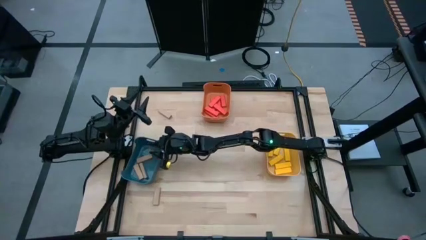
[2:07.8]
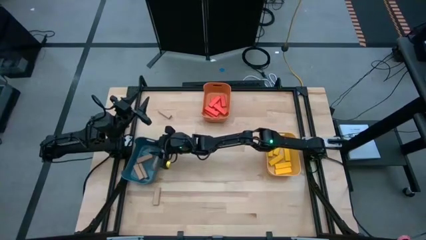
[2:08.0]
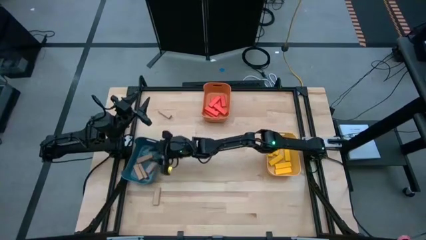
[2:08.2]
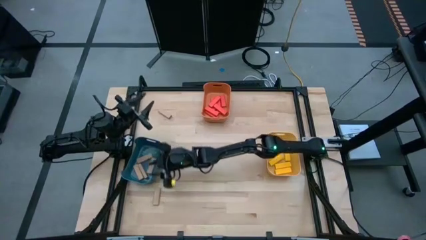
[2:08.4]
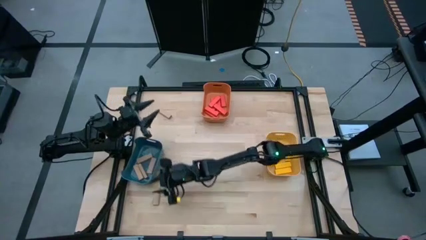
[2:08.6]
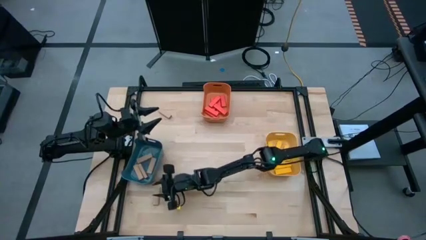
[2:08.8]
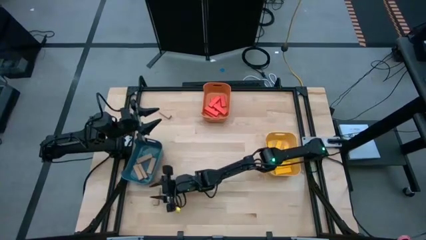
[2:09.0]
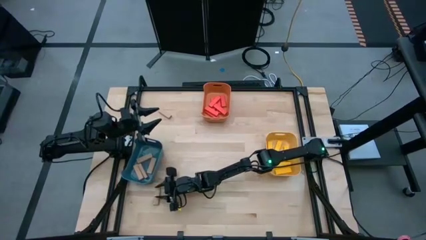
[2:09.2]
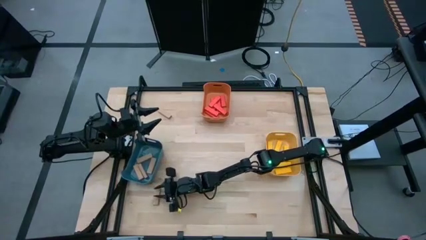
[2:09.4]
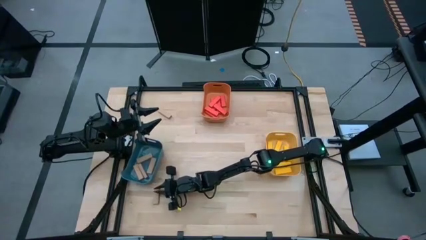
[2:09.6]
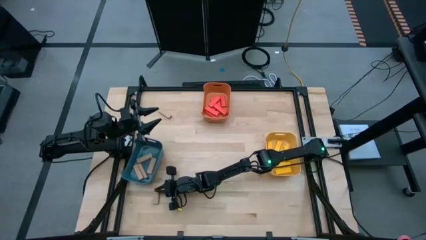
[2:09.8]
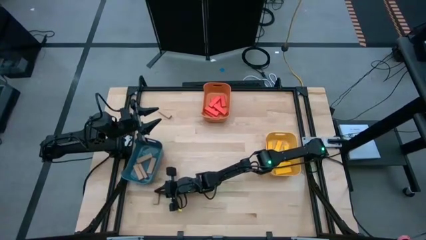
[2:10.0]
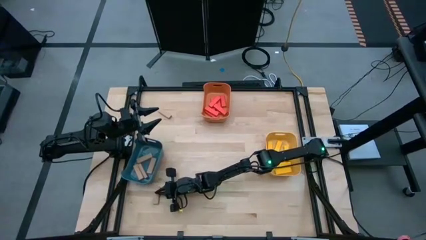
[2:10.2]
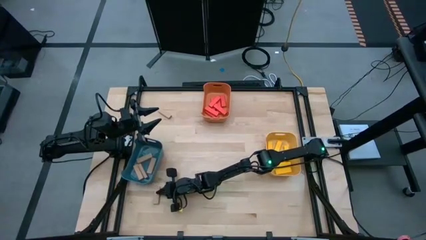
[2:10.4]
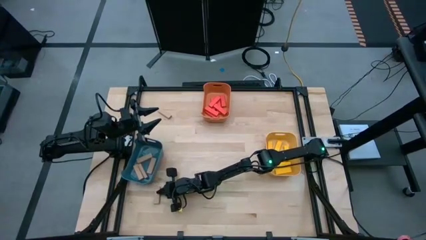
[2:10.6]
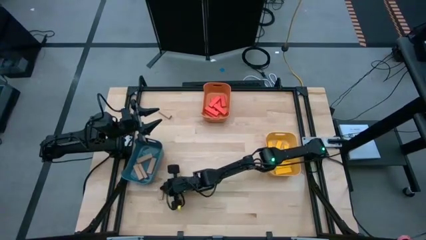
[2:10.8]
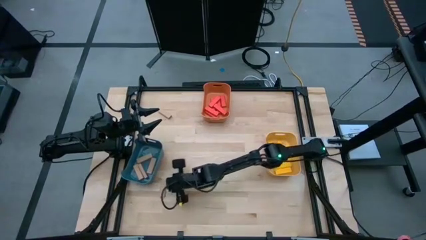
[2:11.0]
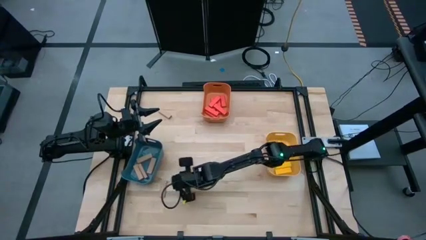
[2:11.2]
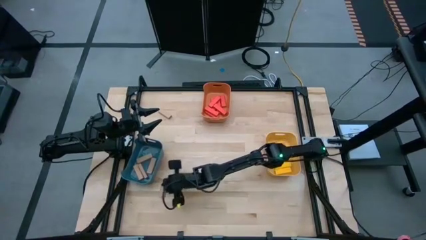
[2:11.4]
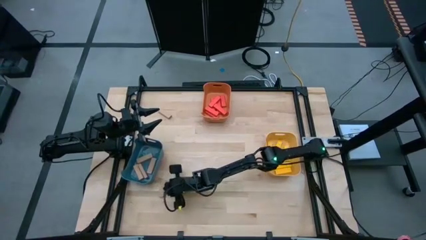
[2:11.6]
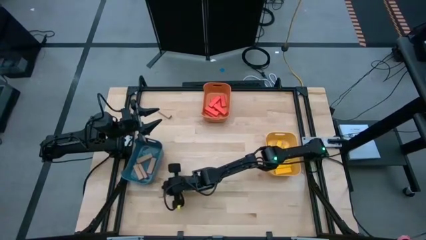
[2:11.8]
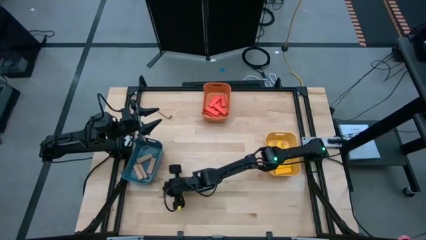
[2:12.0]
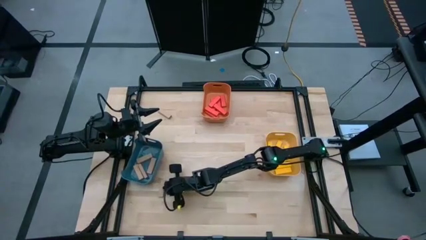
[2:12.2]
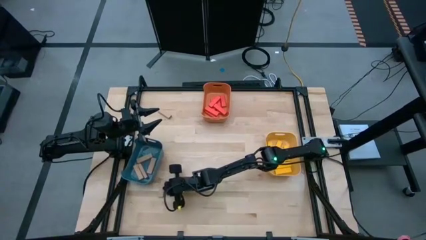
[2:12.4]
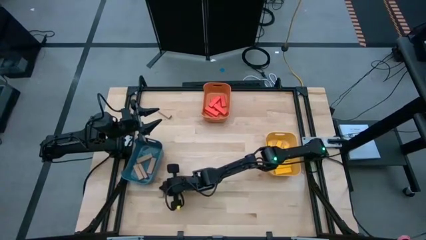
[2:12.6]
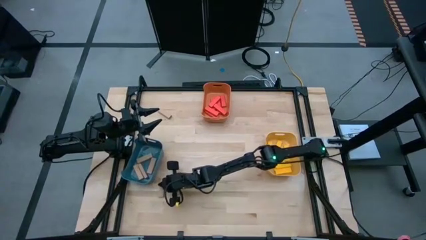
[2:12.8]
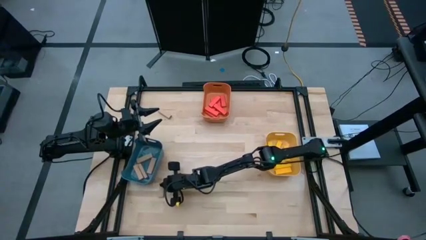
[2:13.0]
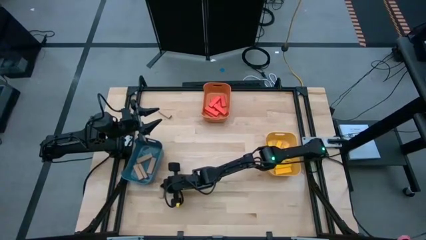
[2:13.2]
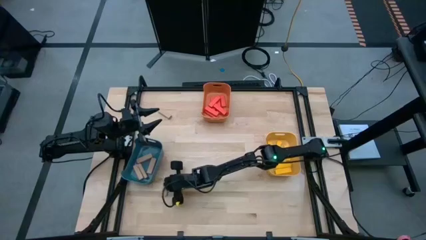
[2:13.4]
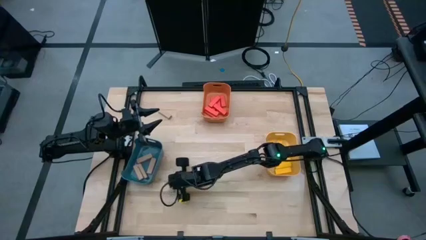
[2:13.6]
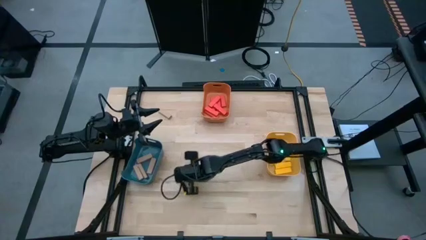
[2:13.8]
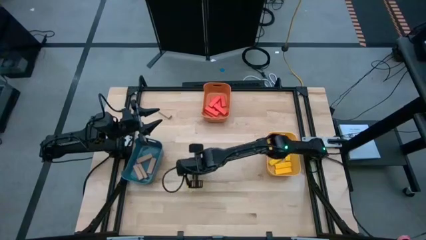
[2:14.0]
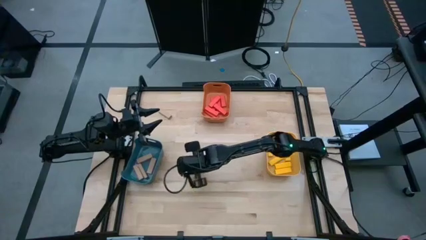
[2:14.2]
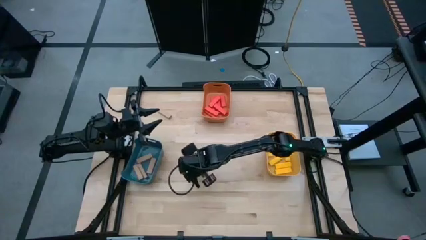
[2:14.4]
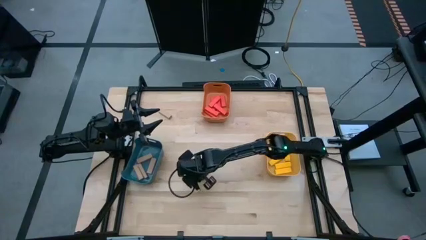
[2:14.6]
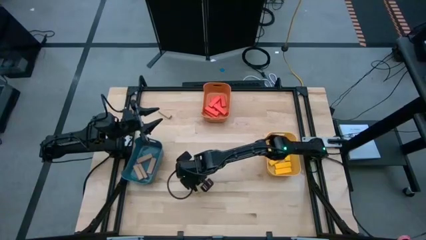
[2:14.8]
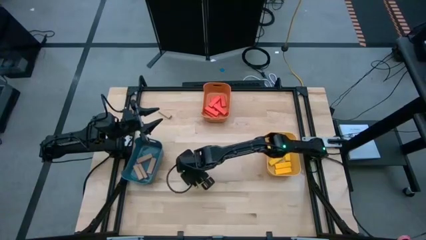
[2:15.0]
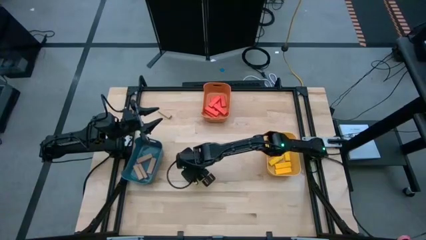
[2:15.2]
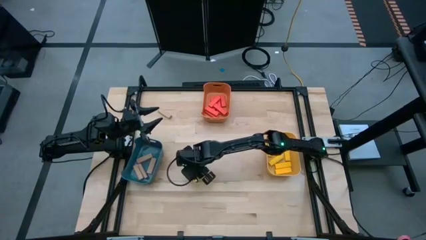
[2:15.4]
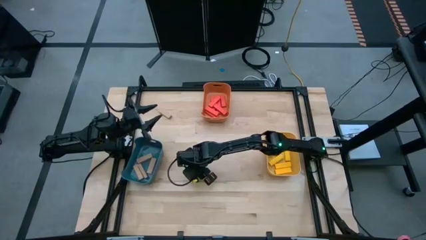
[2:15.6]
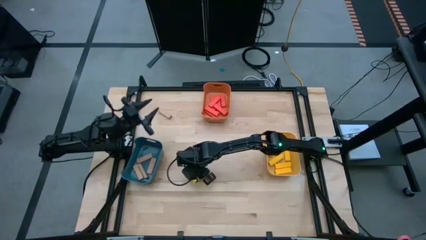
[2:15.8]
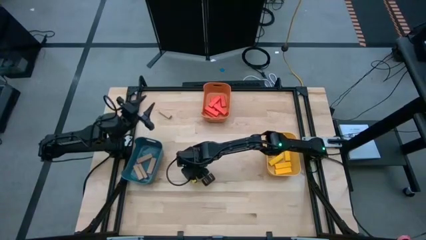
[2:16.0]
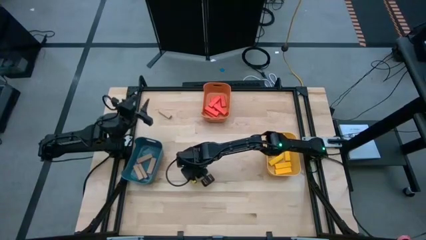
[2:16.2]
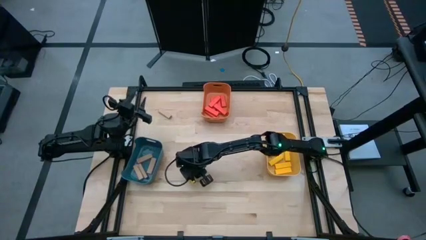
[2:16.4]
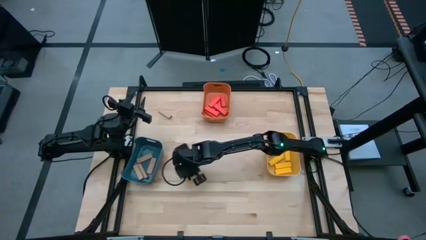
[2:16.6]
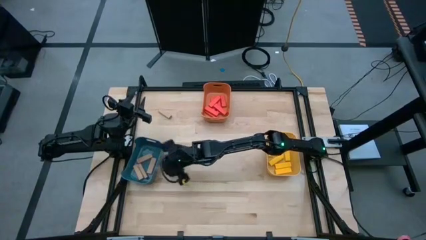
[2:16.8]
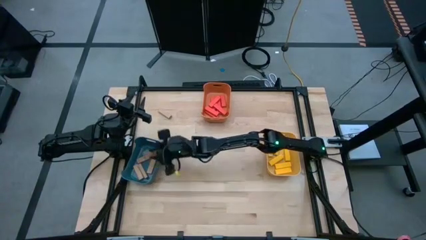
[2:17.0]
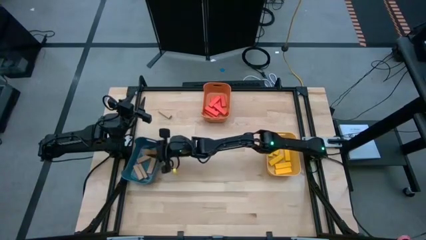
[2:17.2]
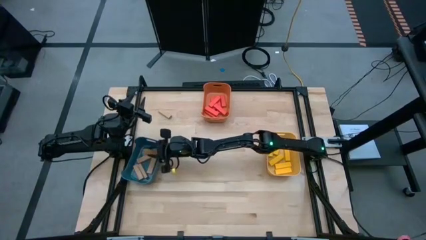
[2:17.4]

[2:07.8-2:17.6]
Task: Sort blocks
Put the bottom brown block into the blue bin

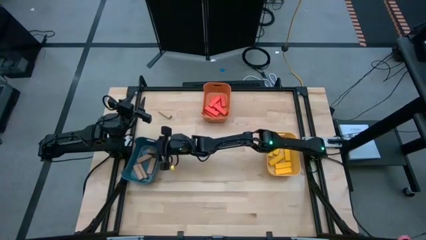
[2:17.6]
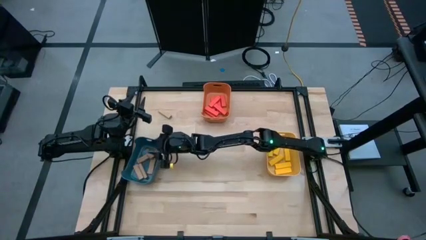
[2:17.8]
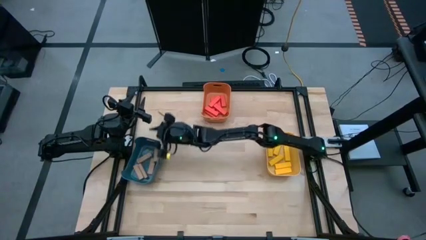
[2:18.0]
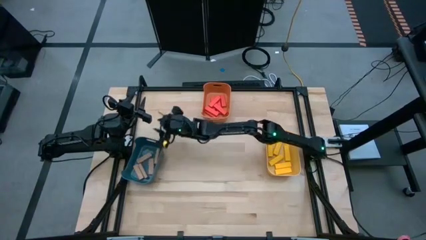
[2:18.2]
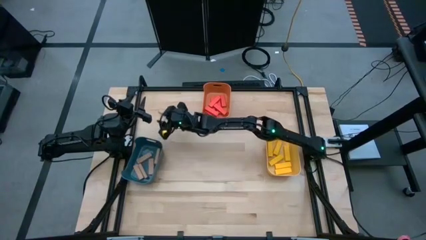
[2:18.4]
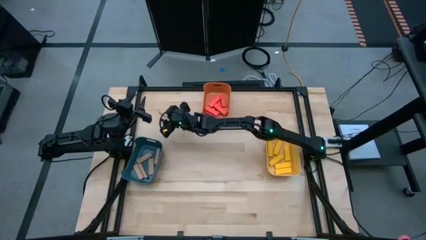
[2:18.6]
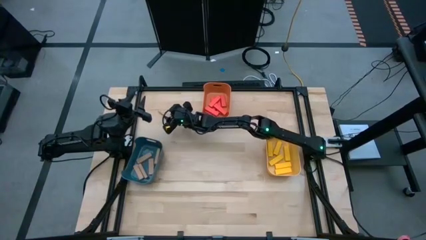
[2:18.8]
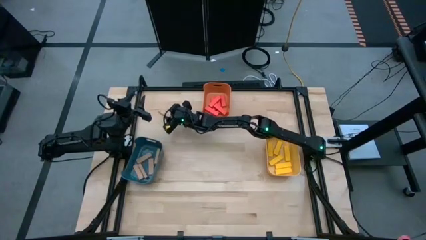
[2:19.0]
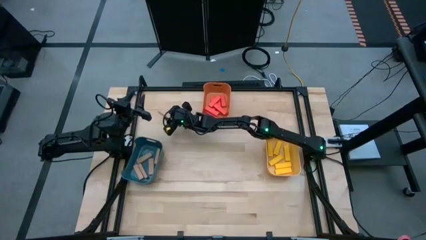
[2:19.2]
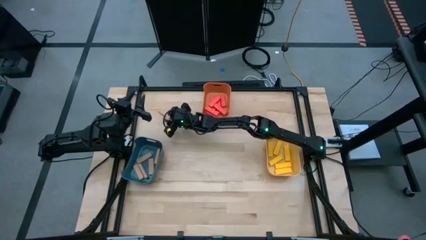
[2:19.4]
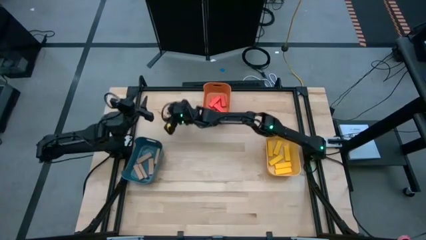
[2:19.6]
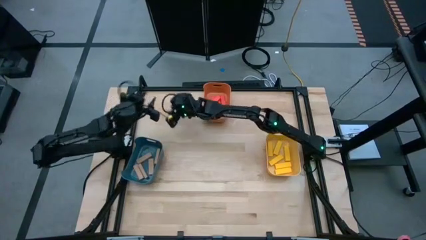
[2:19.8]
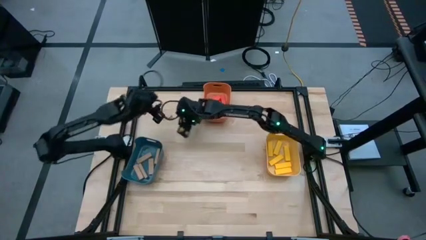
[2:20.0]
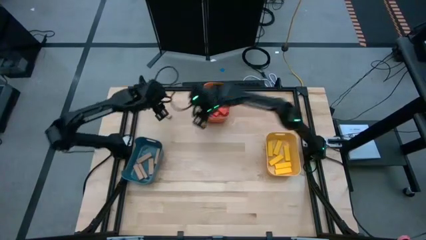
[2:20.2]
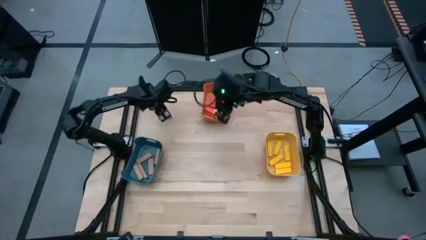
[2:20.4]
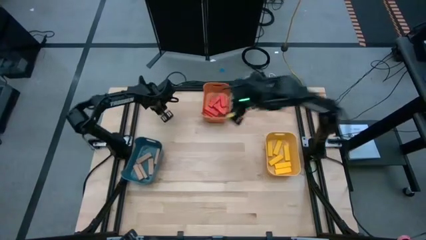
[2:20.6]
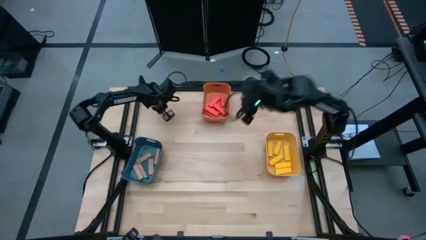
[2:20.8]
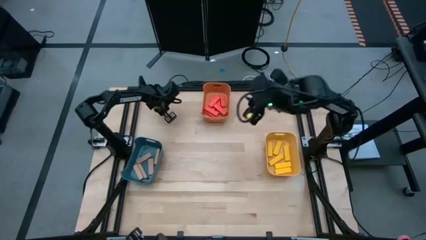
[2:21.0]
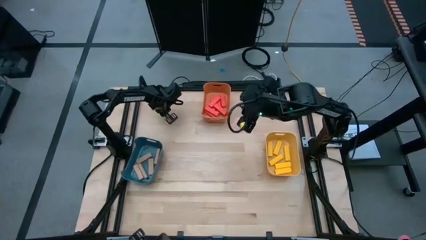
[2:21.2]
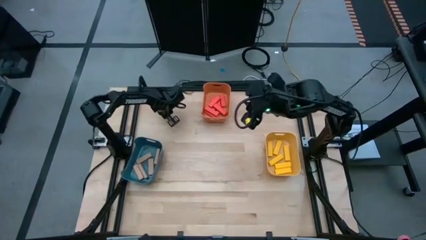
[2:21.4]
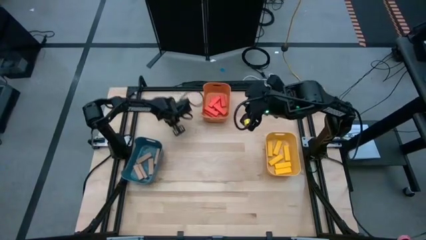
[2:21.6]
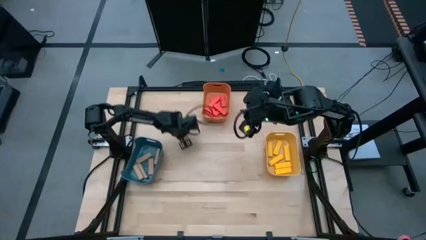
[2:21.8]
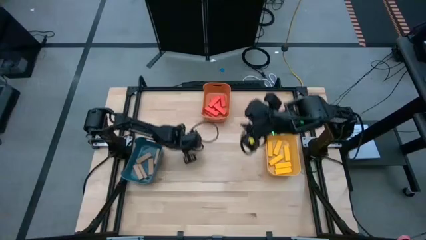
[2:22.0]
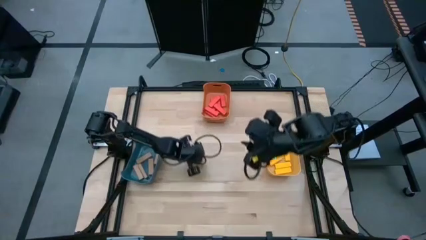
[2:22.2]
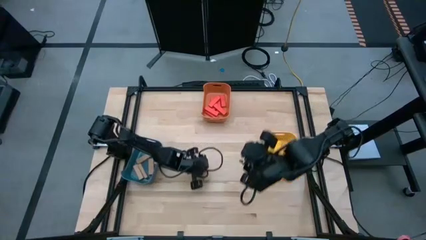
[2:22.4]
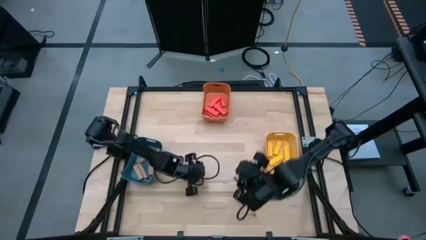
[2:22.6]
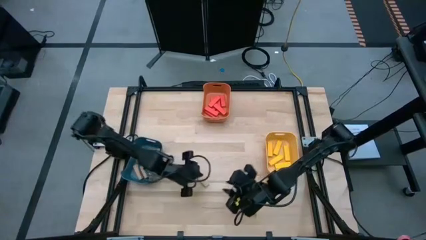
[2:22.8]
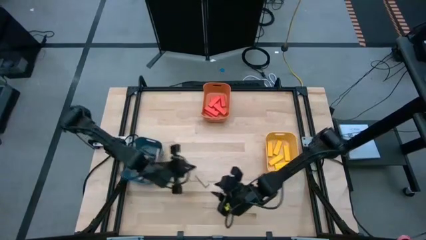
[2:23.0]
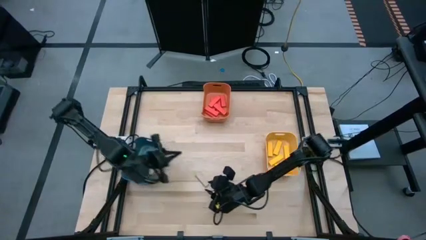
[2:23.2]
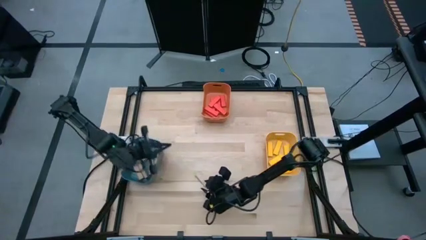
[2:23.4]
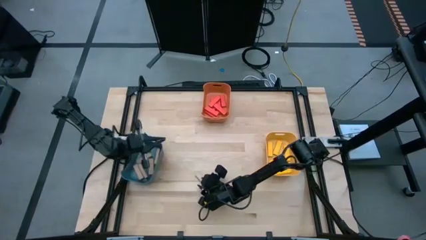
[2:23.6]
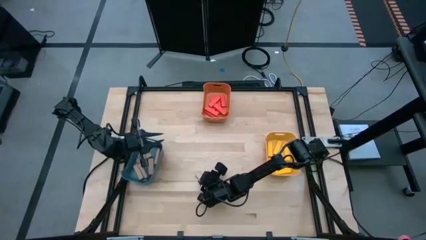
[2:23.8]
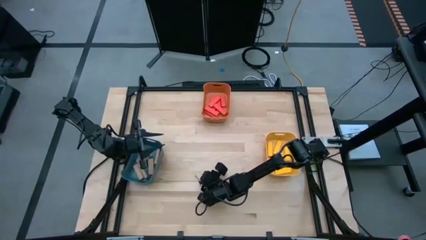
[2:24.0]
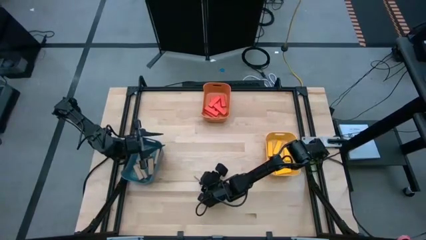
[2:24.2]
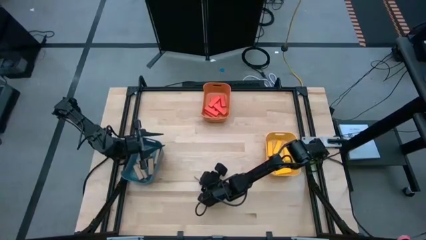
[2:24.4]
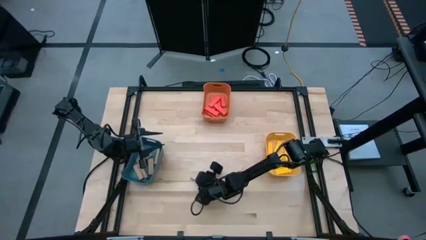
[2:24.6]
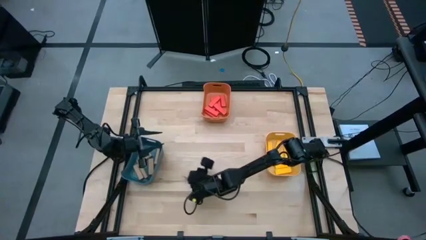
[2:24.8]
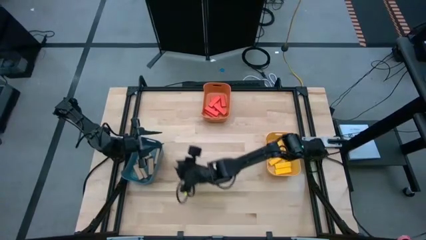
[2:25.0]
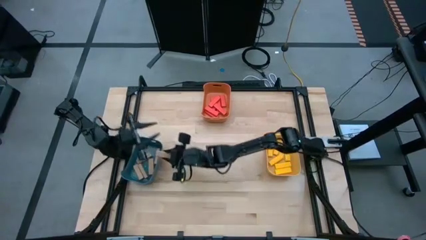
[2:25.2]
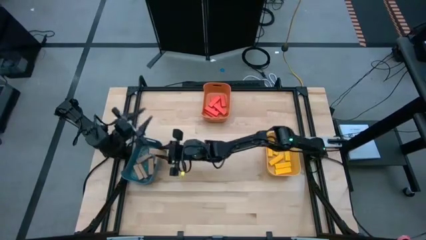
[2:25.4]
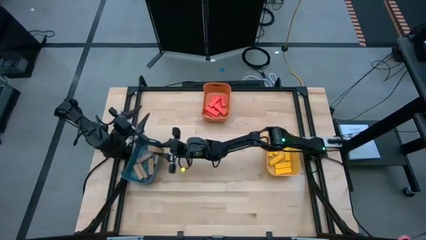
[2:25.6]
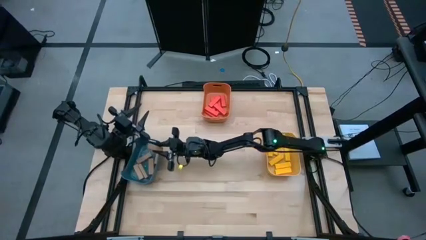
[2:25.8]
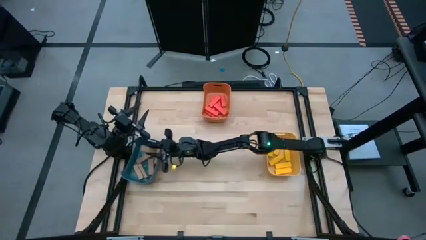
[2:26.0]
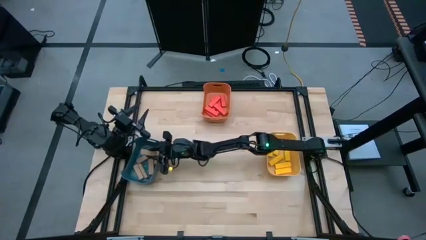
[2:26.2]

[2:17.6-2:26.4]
Put the brown block into the blue bin
